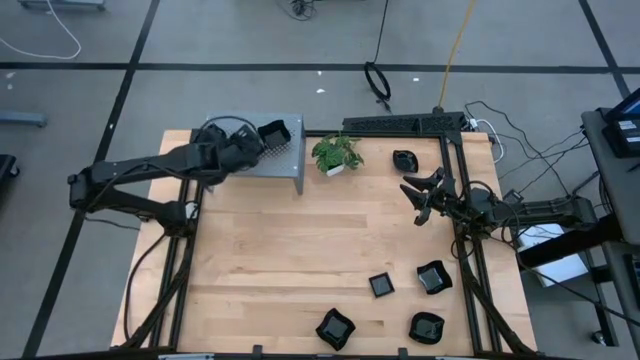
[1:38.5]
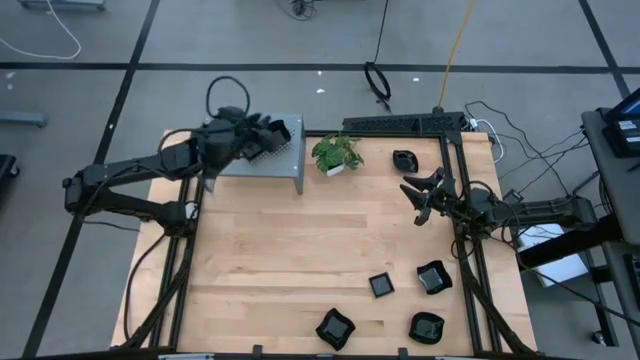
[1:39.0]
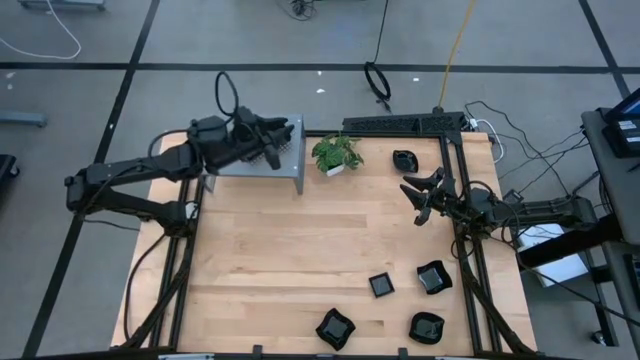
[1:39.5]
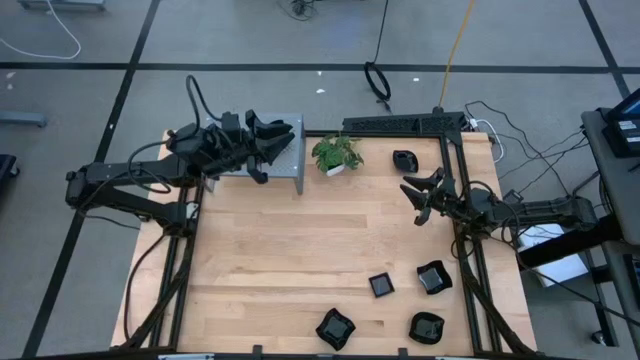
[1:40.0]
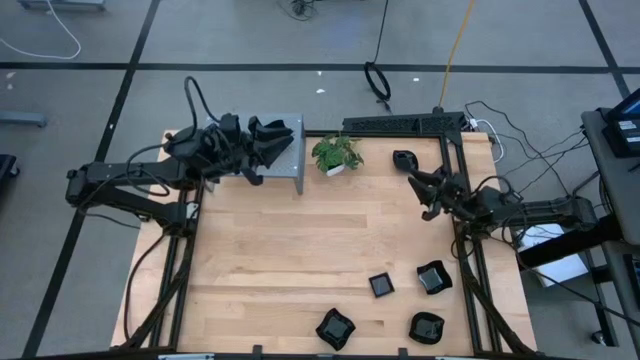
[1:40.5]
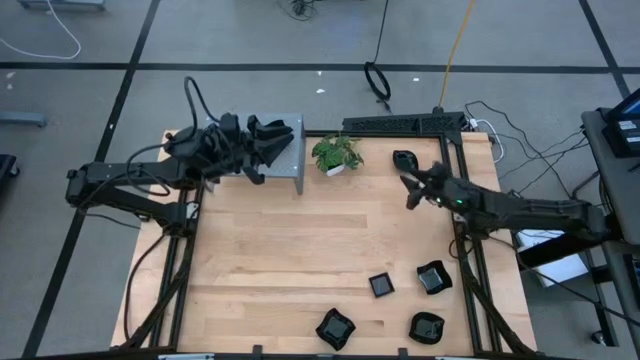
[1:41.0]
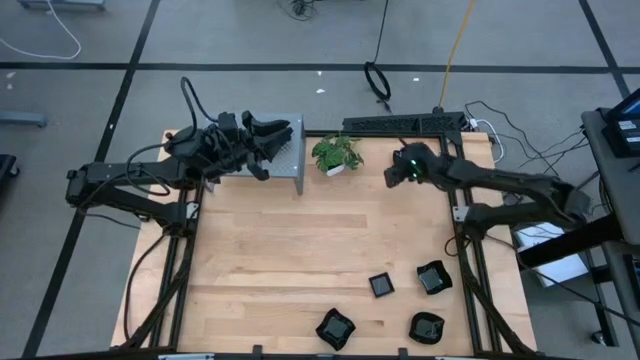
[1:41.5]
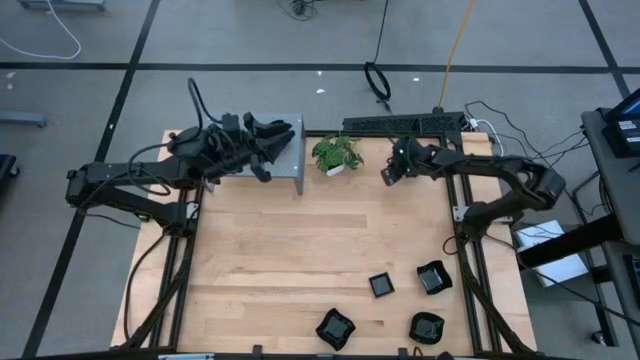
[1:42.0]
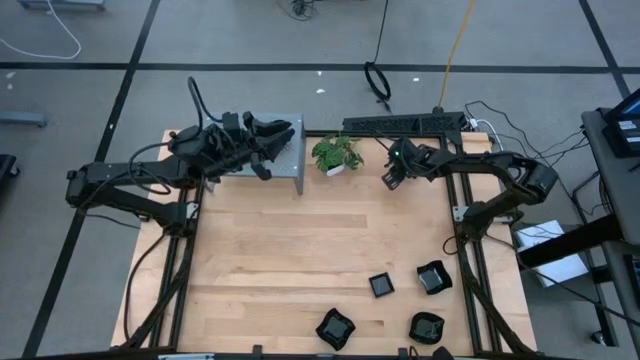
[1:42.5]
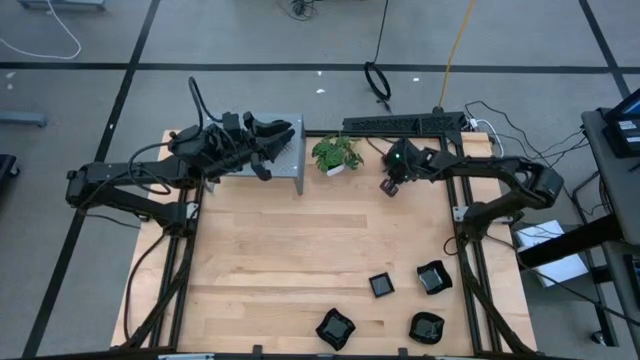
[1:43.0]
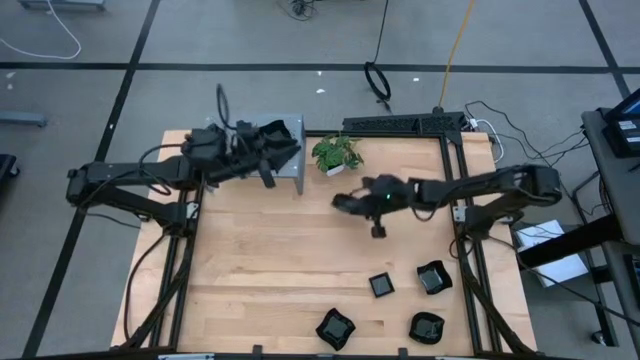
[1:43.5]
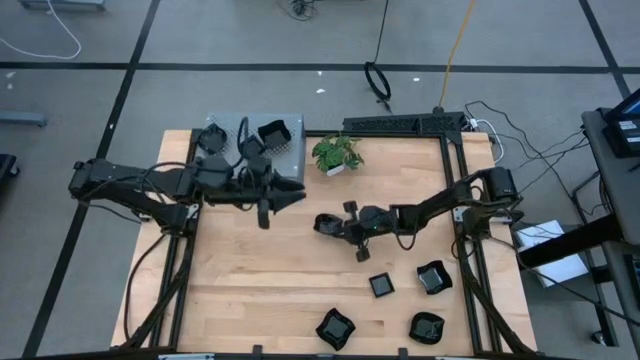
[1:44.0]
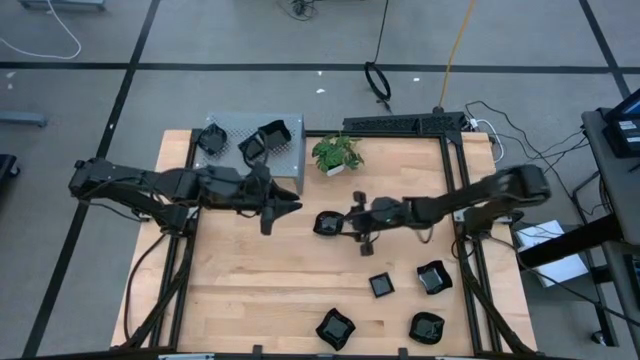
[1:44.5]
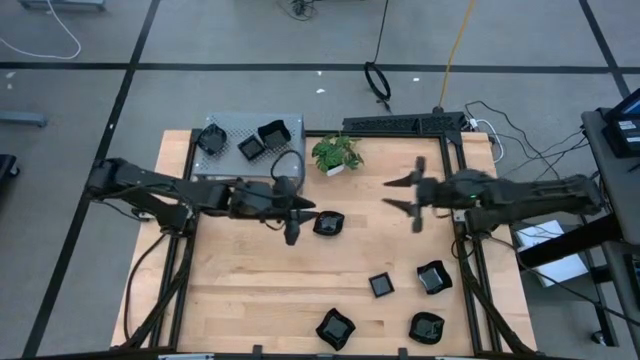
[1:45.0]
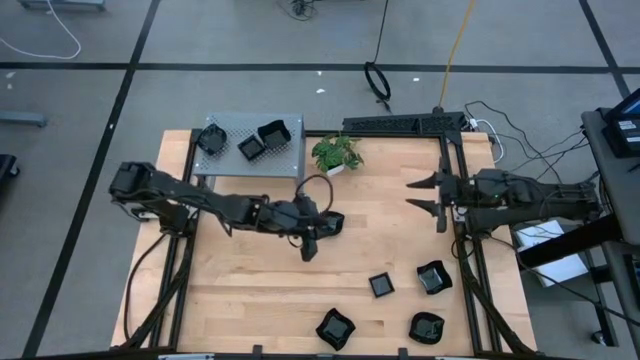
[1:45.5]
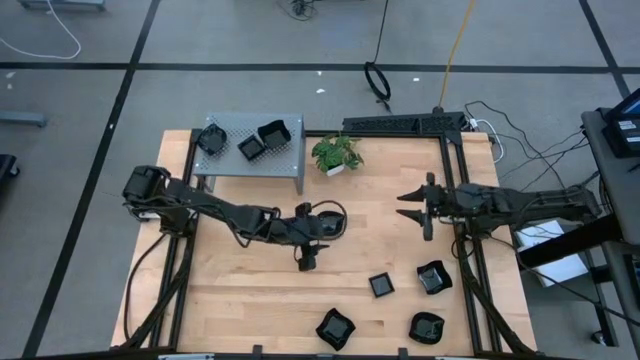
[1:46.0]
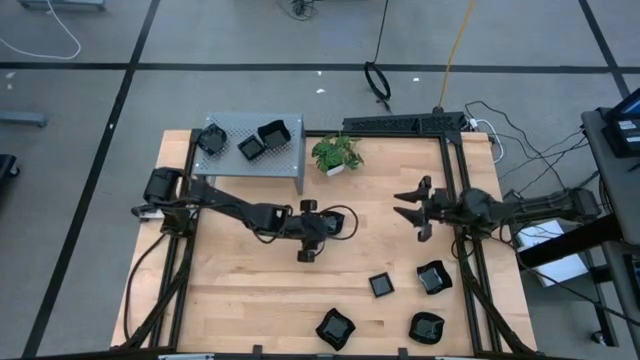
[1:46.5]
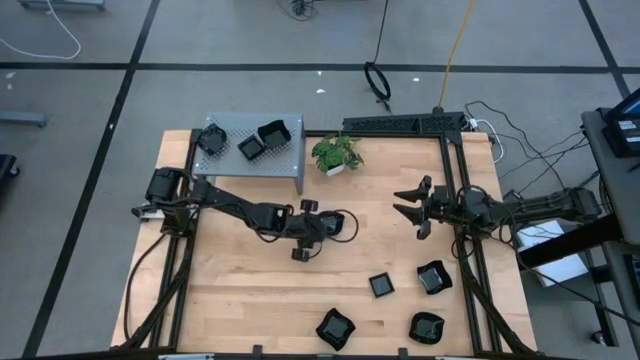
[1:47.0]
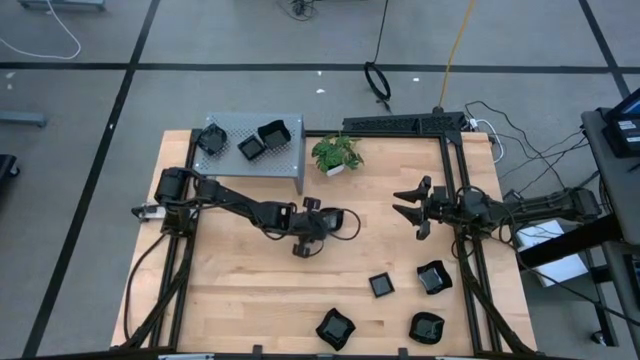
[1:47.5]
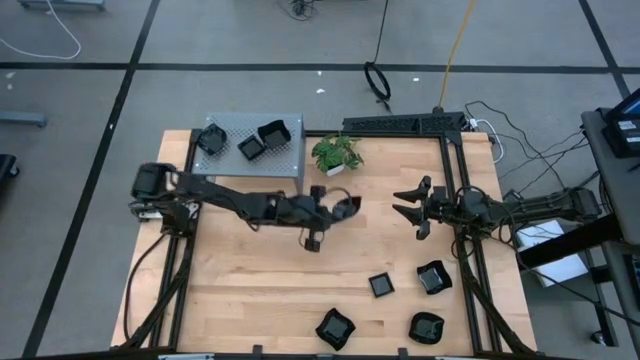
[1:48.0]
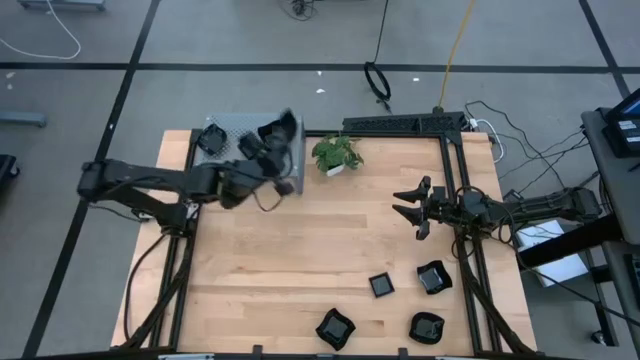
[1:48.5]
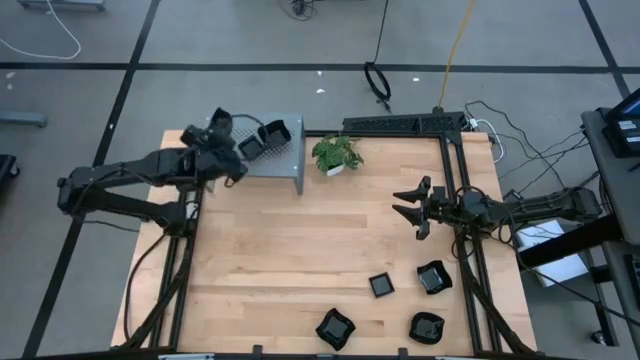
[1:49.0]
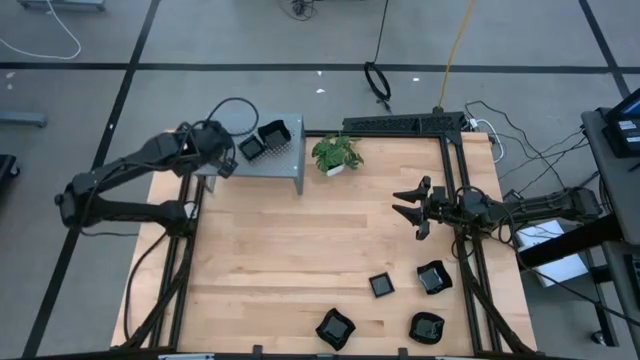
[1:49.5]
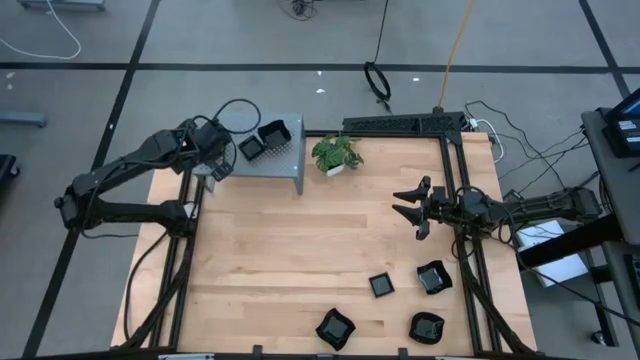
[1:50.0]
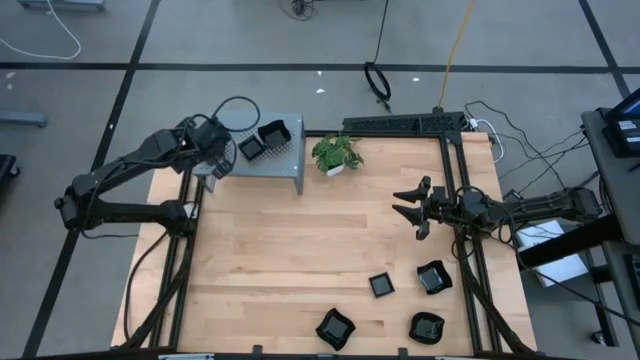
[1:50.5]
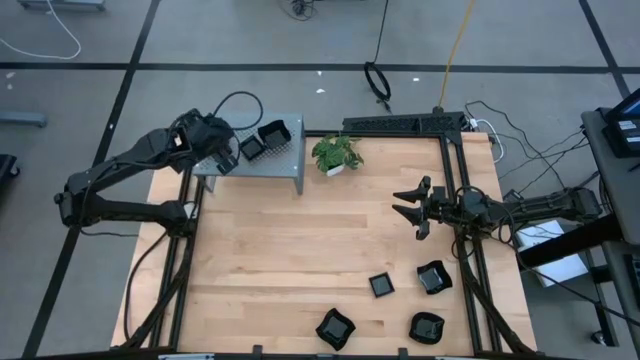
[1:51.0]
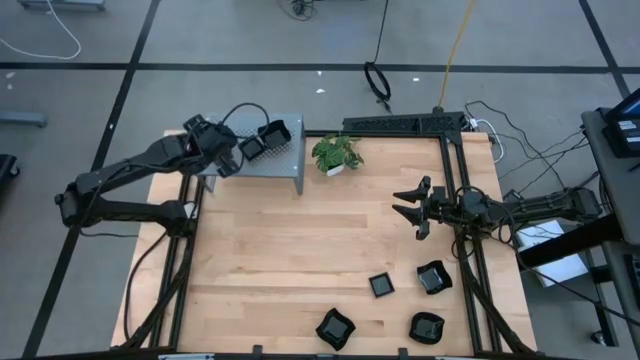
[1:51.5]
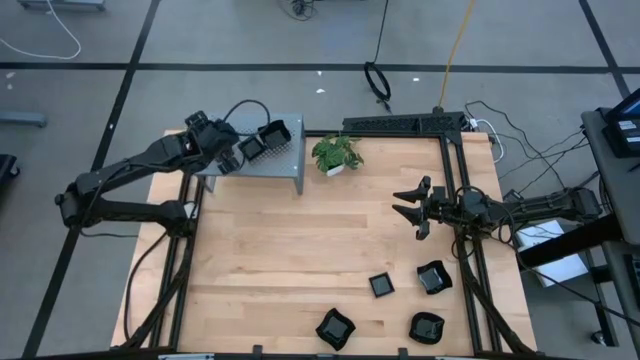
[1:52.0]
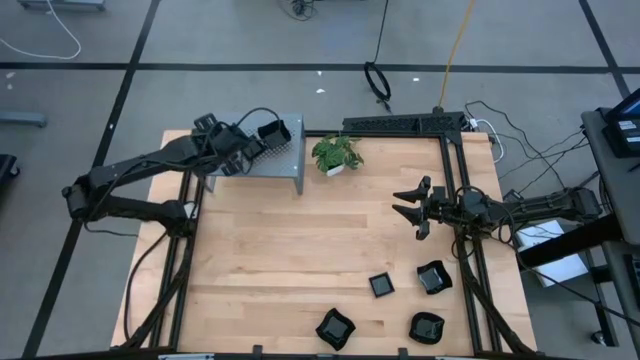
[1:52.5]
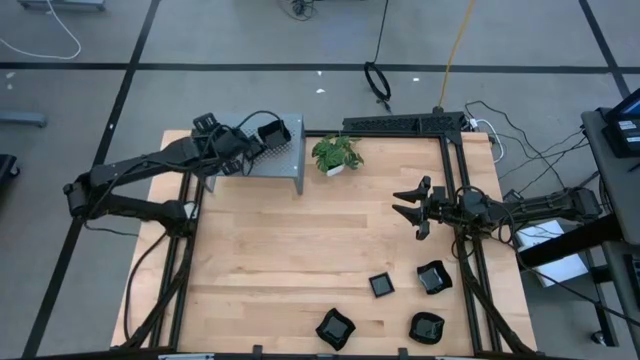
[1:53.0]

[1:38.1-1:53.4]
Task: Pick & Place Mini shaped plates
Stack the black leaf shaped plate on top of the other black leaf shaped plates on the shelf

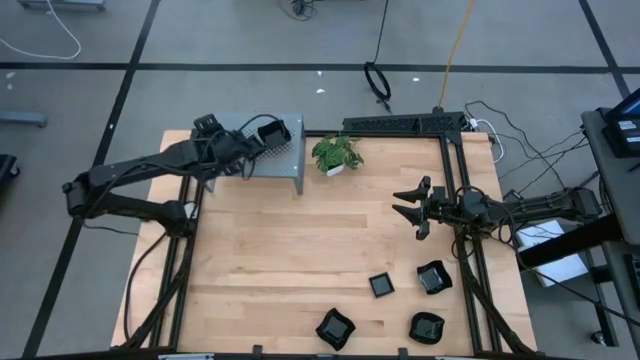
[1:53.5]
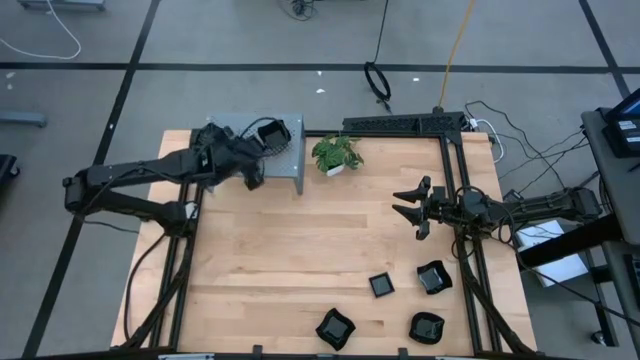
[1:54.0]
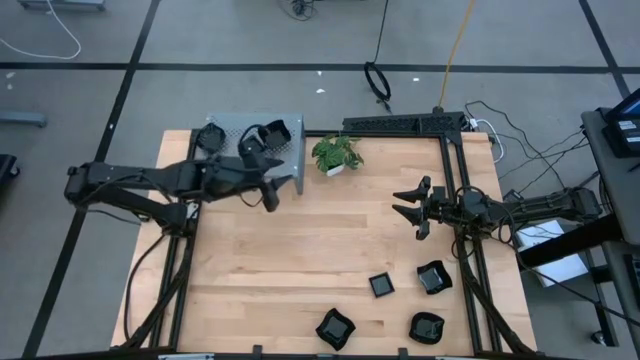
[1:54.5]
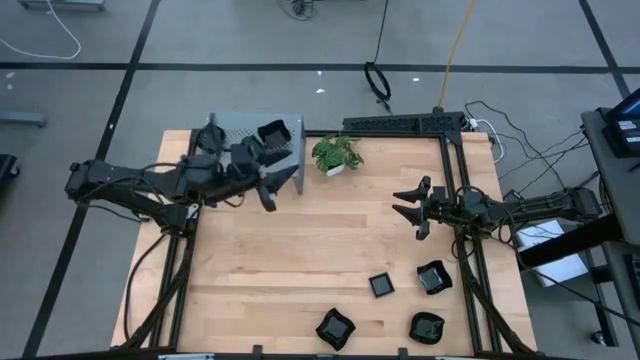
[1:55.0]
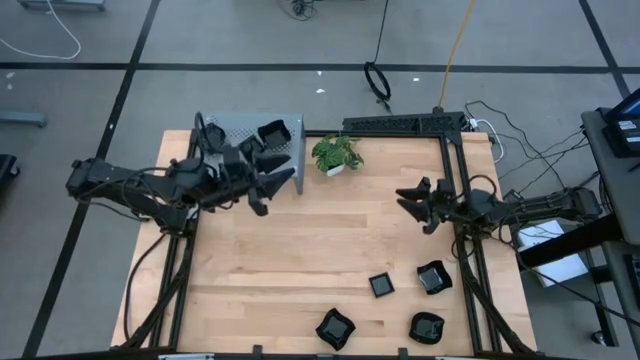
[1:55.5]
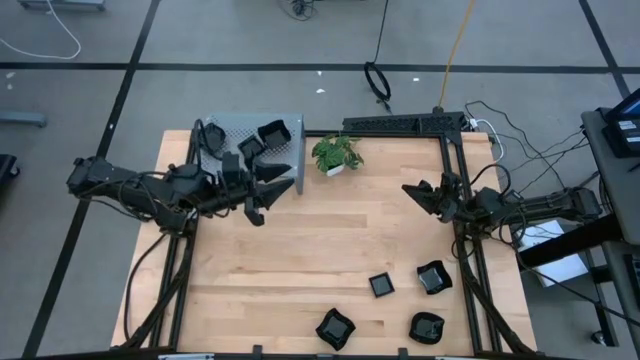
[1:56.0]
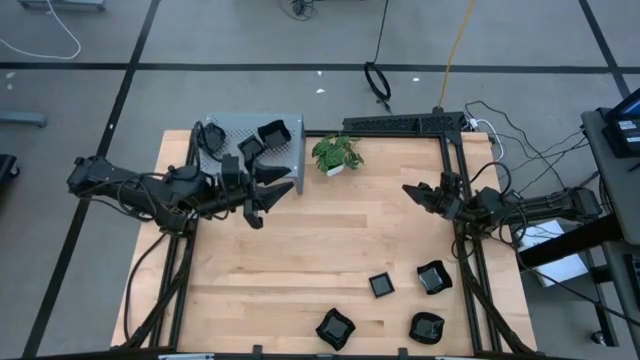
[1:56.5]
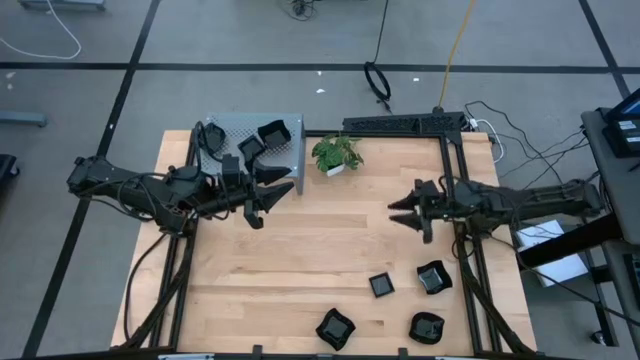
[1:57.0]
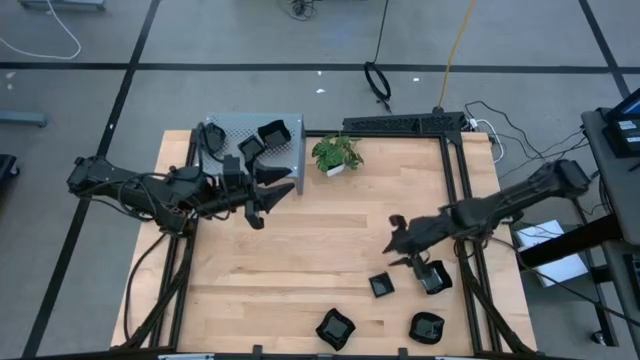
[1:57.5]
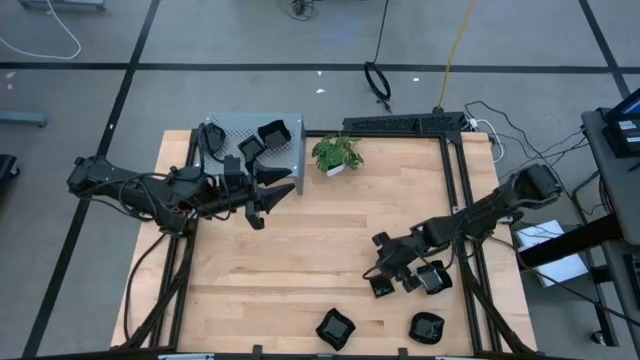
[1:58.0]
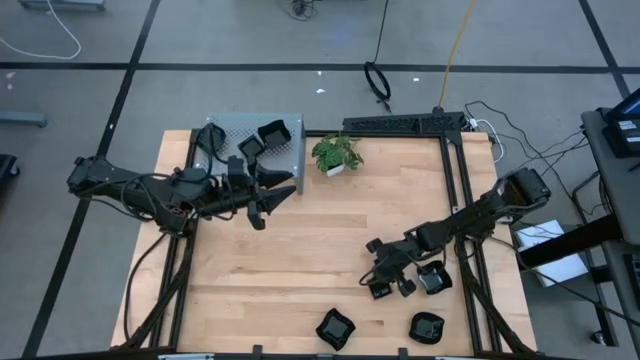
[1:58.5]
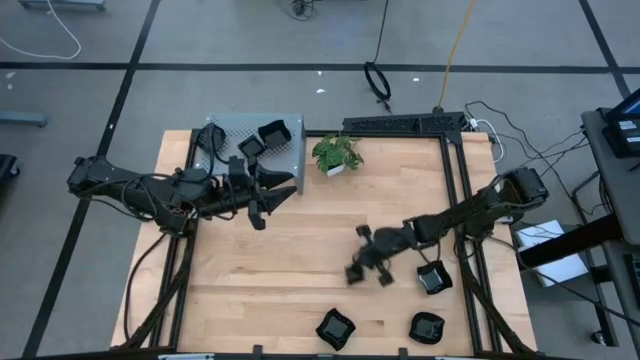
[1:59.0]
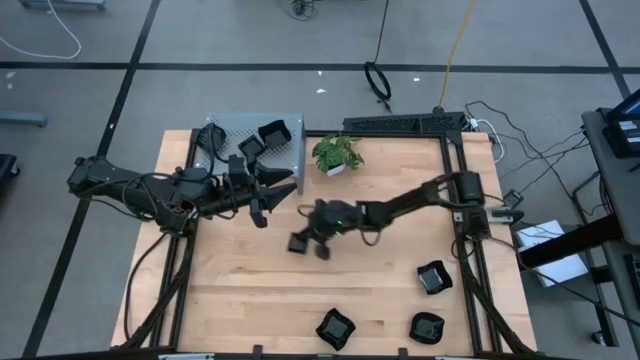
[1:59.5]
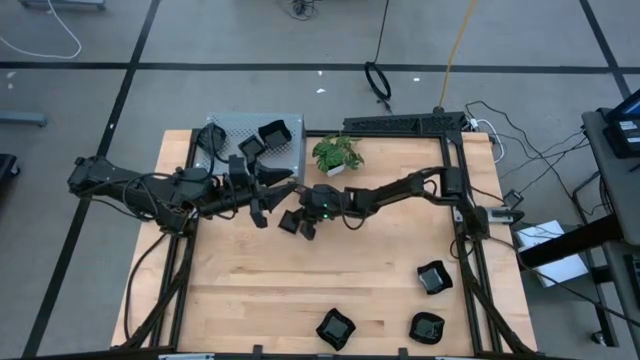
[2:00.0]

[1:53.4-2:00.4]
Move the black square plate to the center of the table
